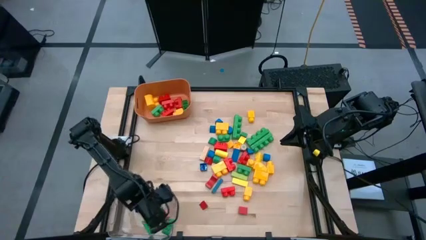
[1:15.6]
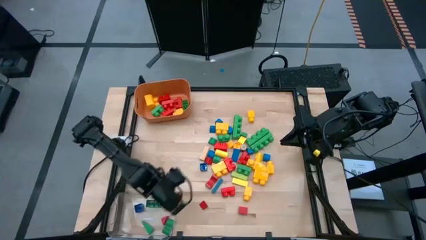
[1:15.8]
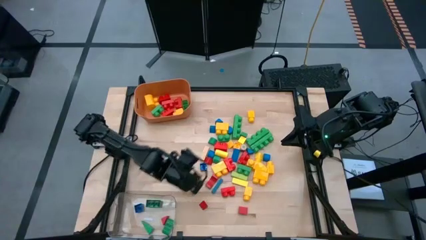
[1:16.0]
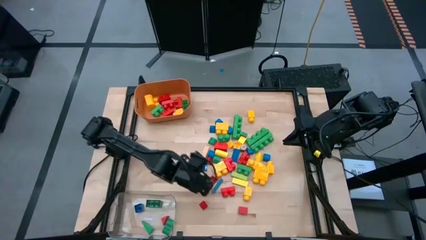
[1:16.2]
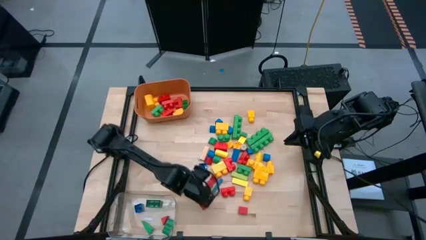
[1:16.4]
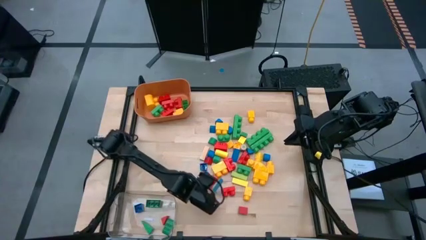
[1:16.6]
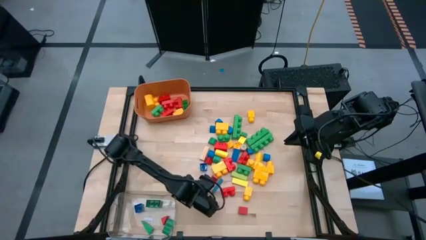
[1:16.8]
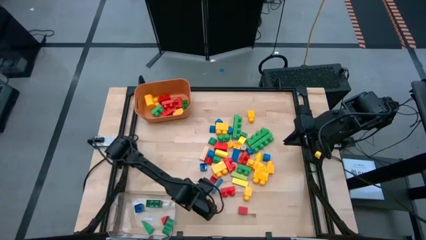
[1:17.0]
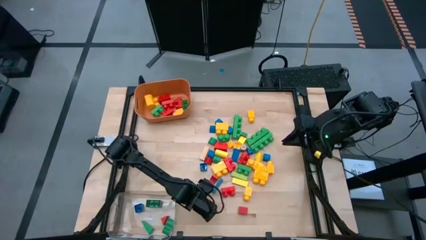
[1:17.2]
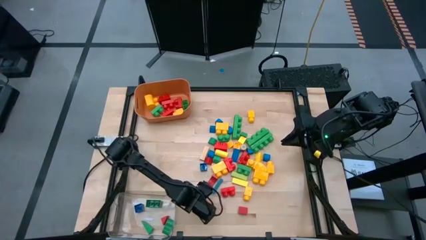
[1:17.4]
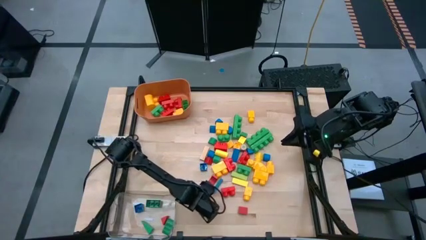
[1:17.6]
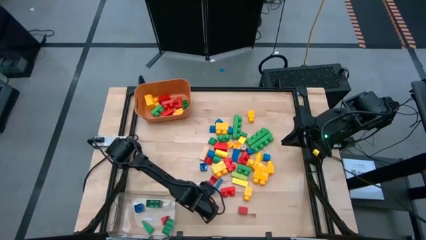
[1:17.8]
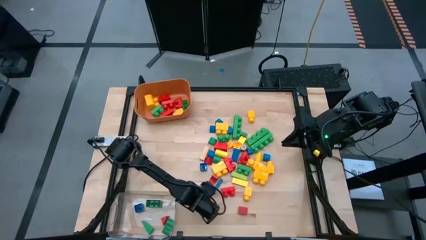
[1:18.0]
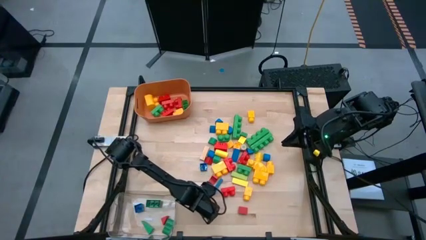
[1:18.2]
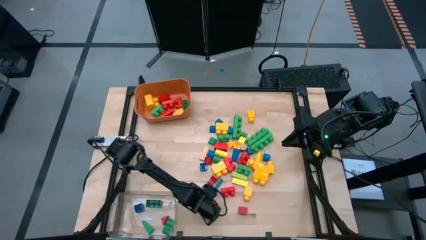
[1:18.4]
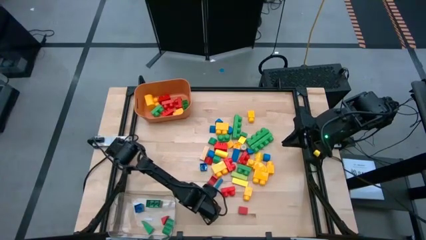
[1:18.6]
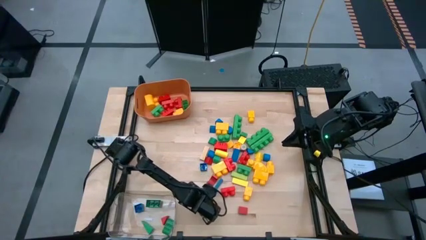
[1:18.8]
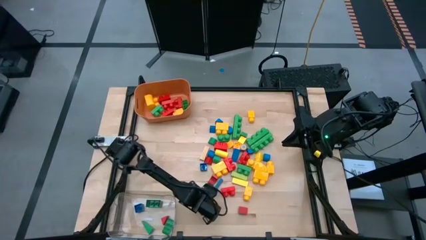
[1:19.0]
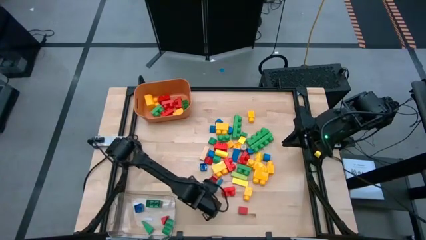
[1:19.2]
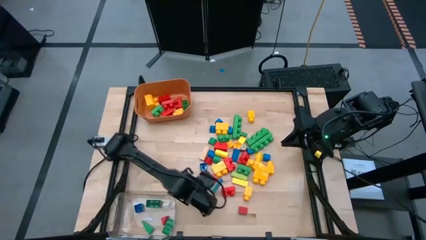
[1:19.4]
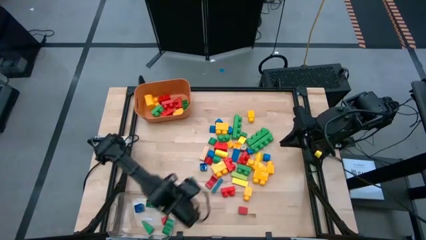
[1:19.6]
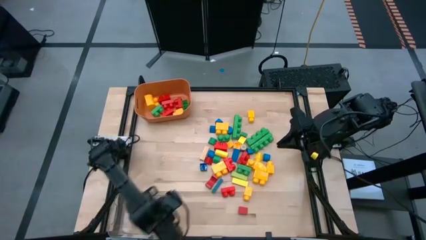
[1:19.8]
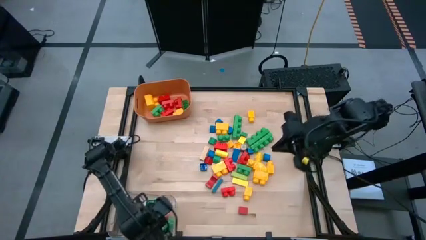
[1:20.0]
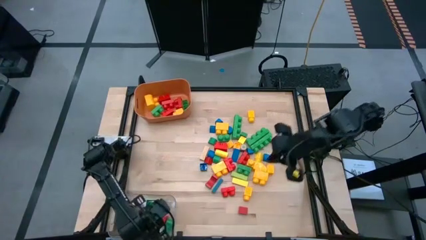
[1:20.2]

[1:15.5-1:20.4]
Task: Sort blocks by size
Put the small red block into the transparent bin

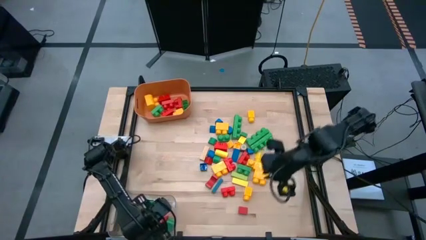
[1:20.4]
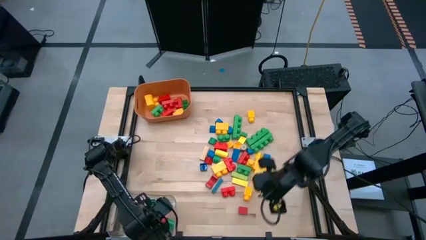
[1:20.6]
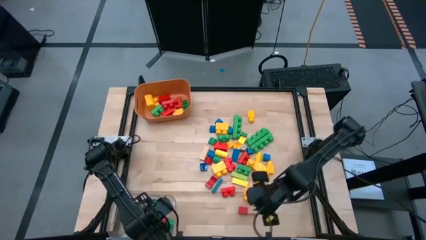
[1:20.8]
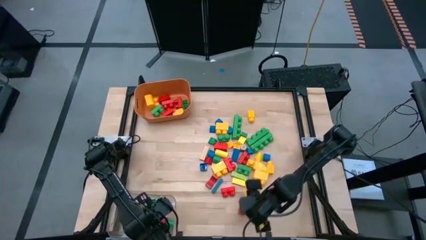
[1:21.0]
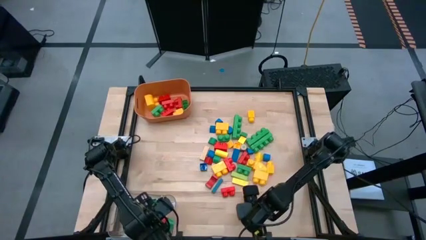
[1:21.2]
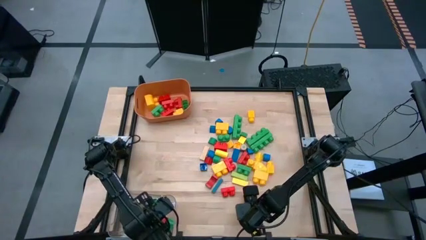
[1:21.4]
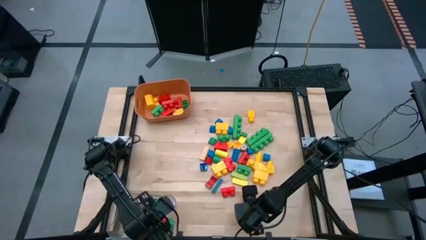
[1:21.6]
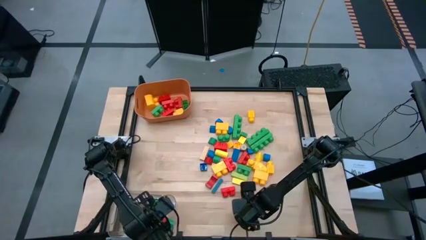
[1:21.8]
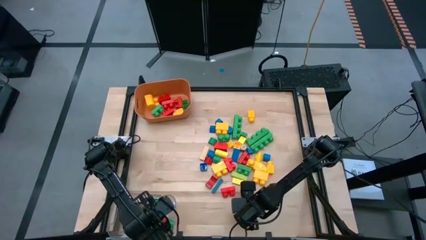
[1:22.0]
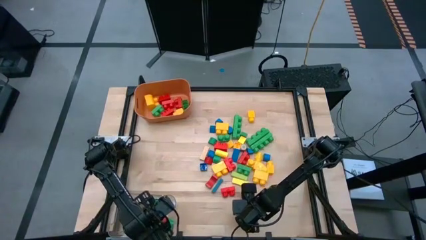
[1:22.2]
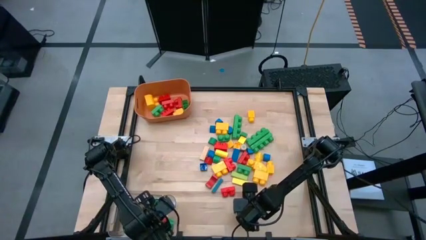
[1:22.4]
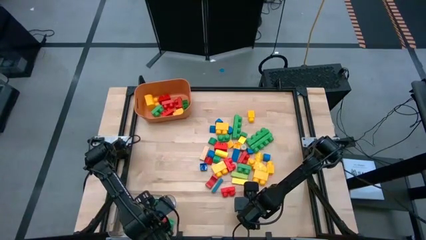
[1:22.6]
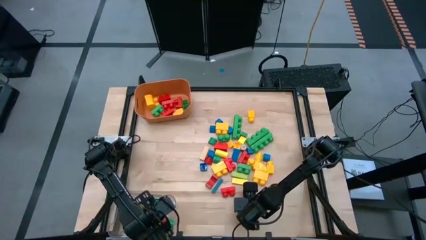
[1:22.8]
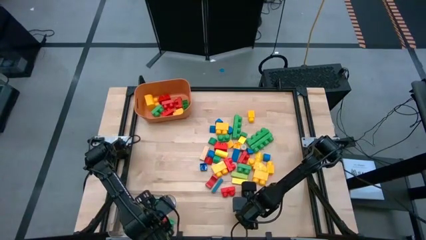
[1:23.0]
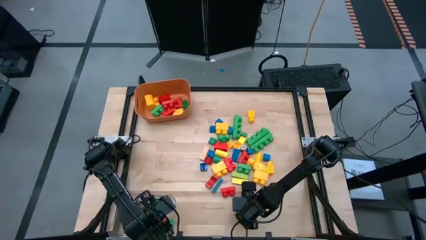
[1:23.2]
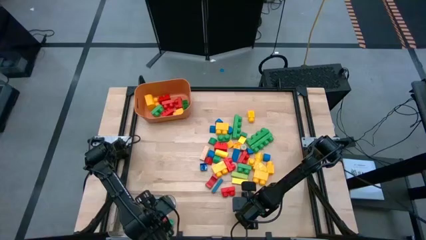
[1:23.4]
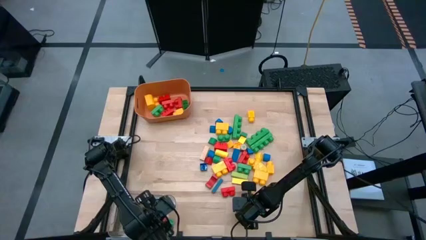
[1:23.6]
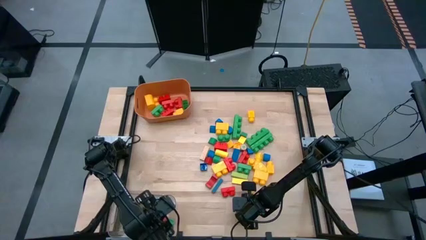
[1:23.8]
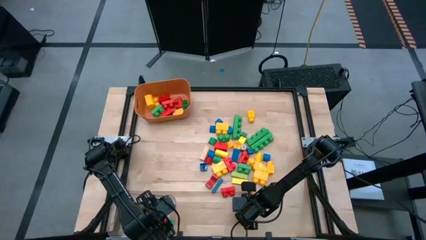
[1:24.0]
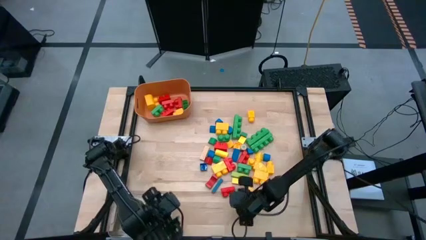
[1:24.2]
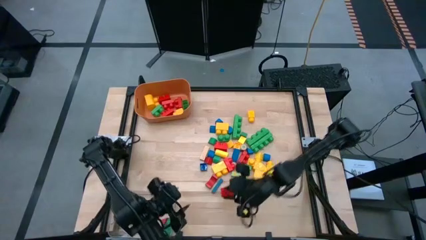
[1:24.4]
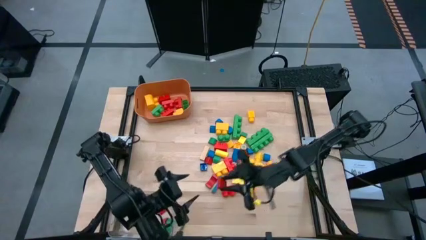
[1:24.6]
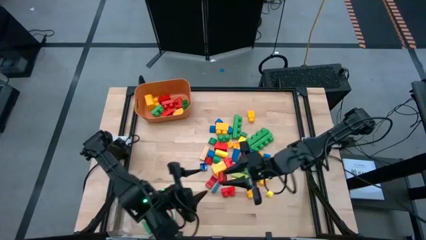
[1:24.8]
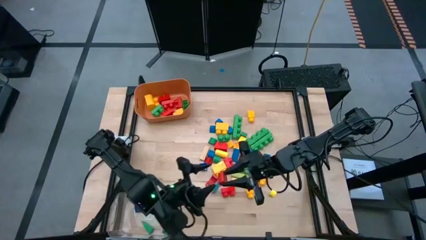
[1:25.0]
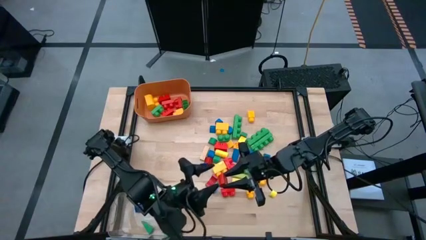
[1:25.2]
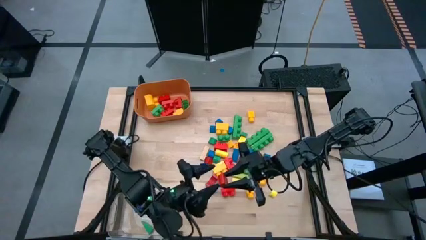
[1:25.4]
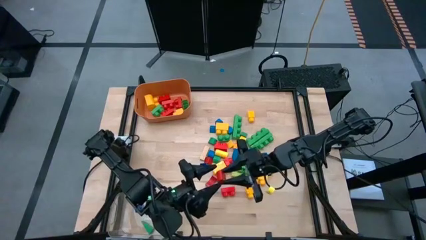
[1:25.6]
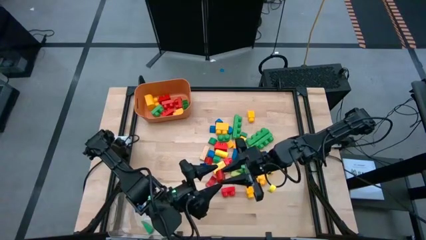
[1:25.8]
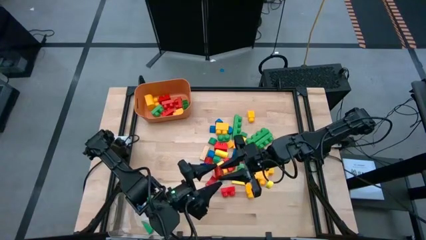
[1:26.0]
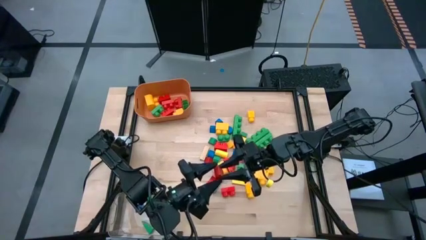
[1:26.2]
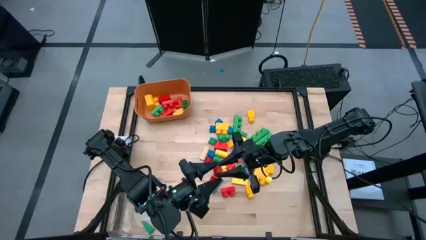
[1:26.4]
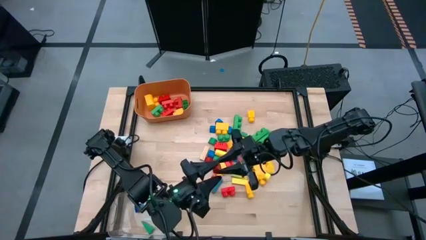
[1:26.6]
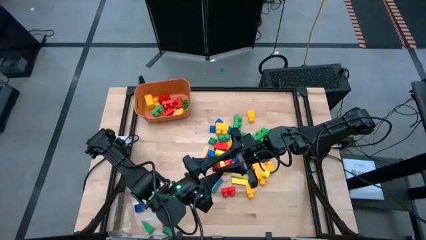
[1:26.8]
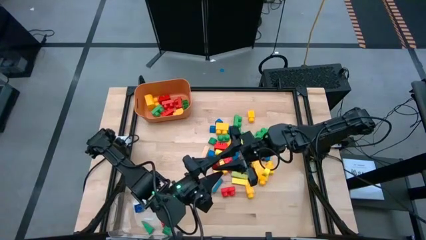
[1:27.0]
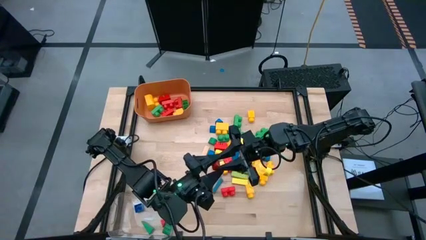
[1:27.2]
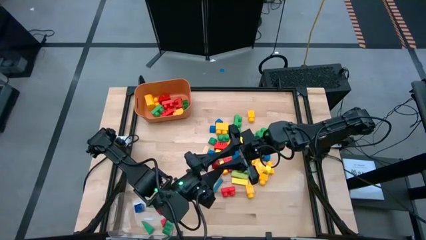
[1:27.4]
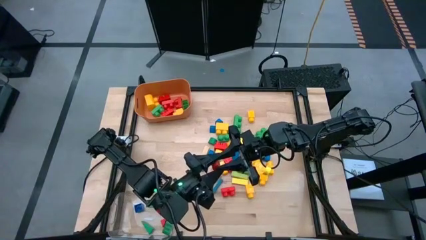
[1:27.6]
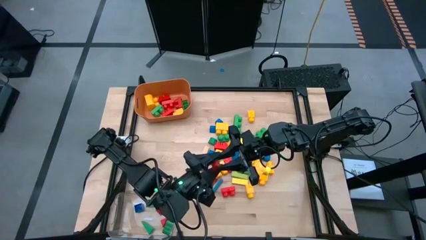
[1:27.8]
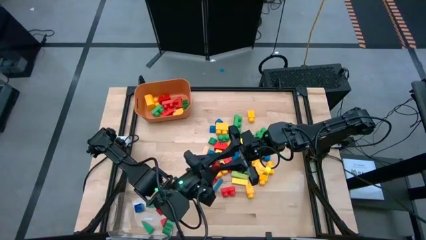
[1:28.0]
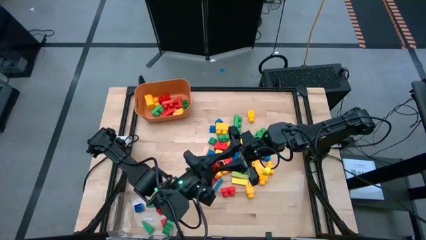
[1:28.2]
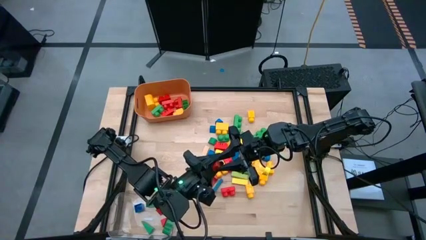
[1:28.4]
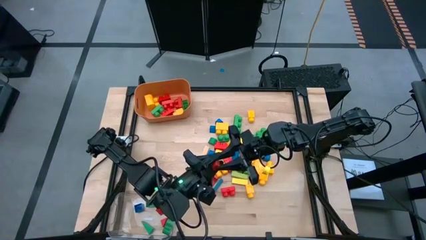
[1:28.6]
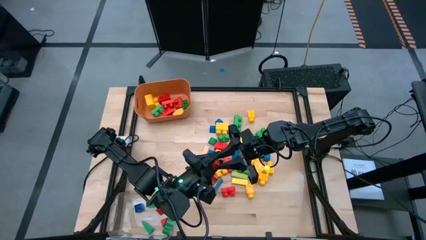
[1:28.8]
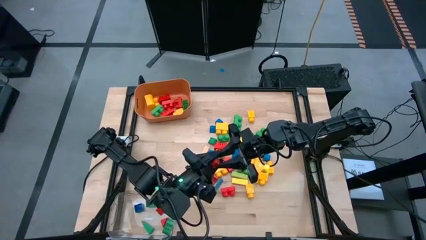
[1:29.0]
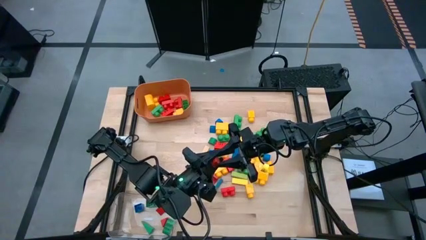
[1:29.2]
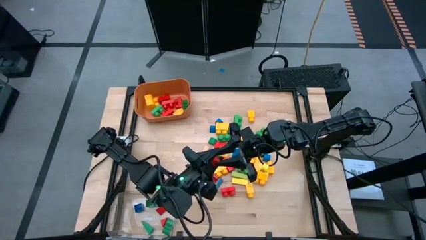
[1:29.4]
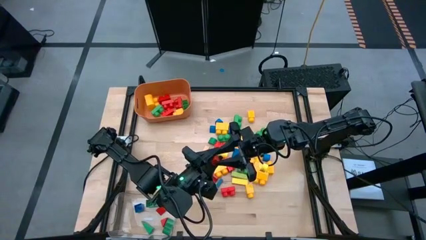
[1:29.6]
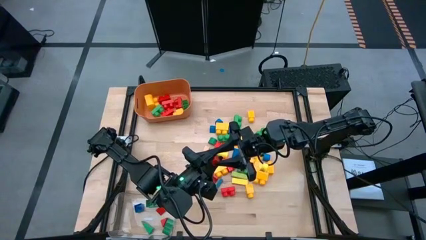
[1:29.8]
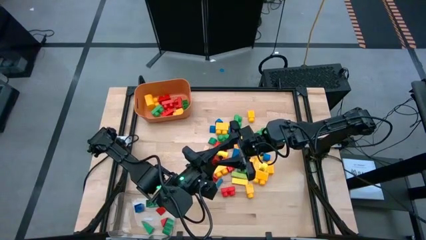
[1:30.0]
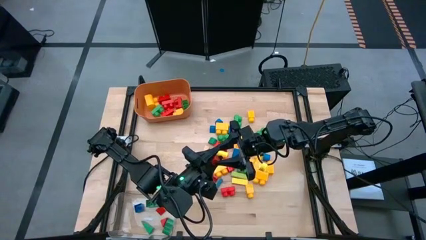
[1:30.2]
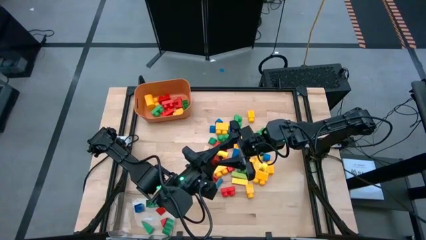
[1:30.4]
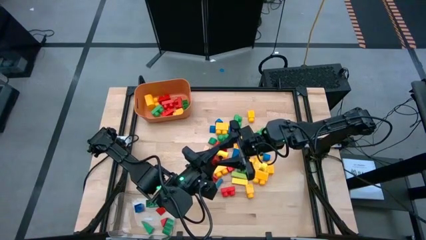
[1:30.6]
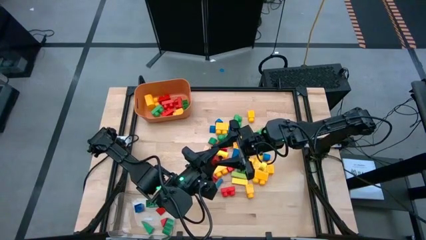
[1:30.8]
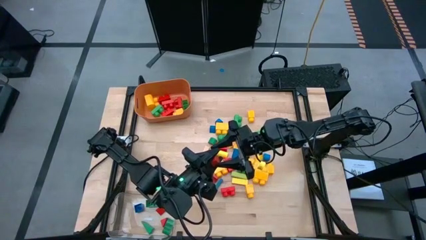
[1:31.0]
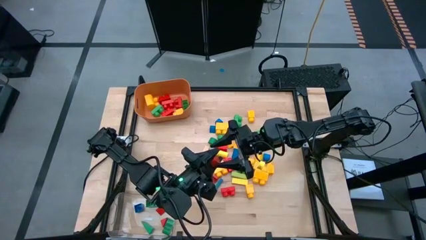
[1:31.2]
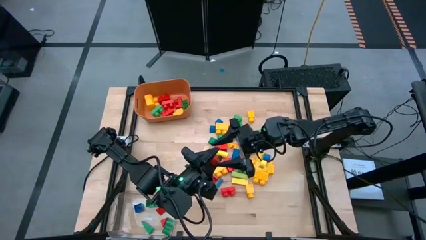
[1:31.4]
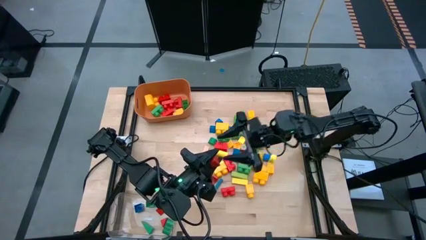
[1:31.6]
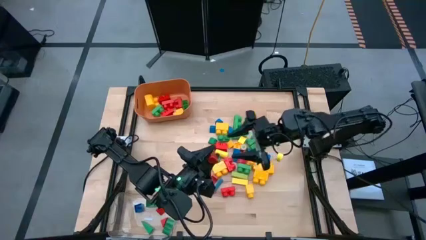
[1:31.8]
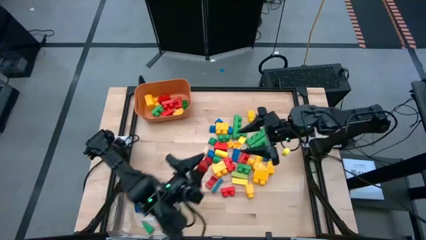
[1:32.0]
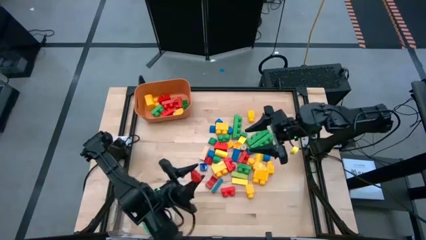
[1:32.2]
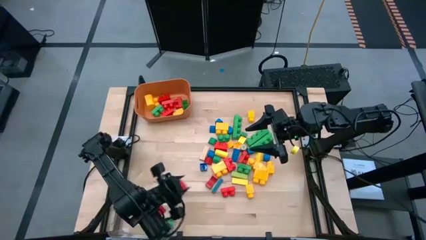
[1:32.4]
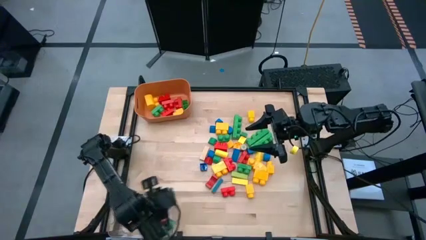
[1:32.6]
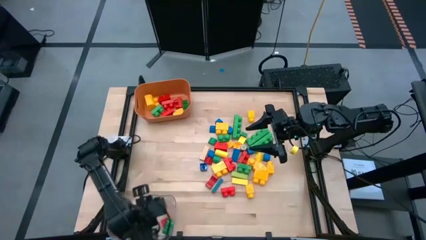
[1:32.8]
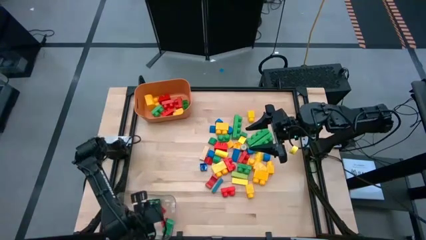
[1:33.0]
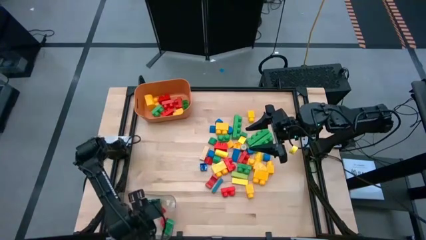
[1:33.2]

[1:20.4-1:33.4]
Put the small red block into the transparent bin
